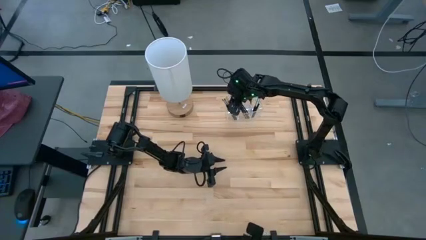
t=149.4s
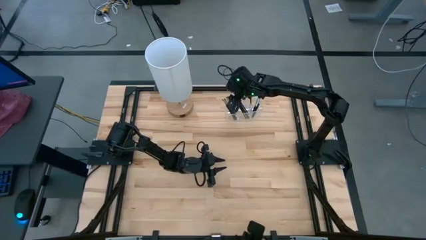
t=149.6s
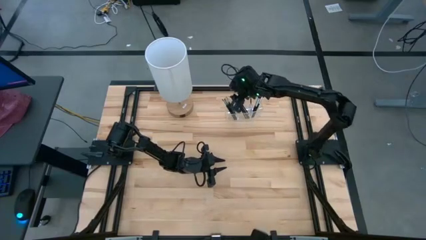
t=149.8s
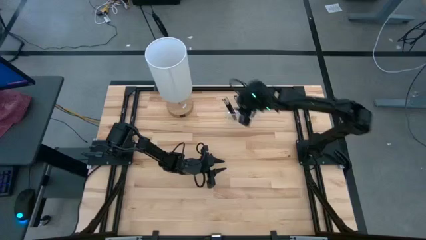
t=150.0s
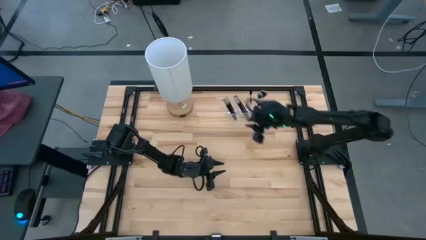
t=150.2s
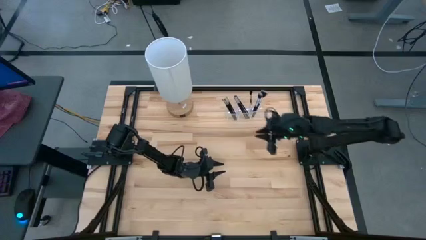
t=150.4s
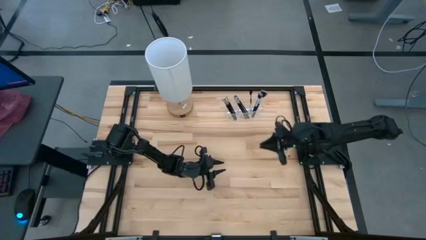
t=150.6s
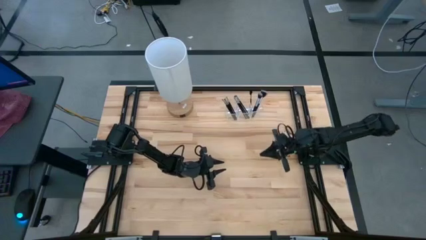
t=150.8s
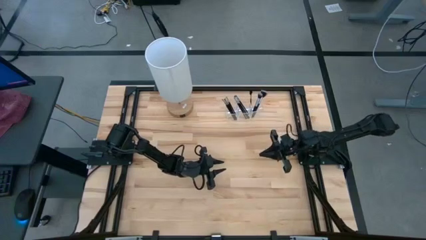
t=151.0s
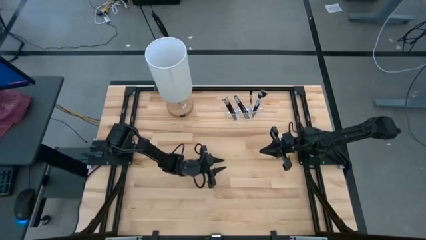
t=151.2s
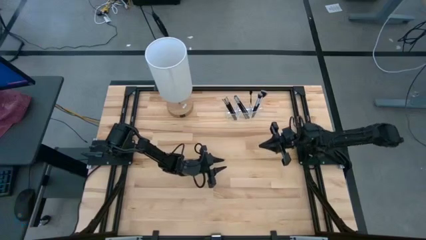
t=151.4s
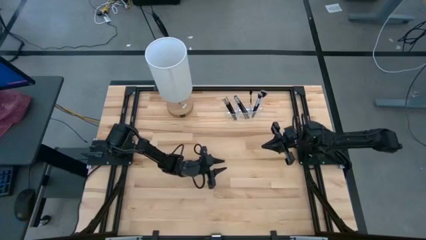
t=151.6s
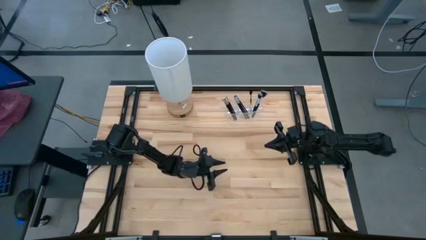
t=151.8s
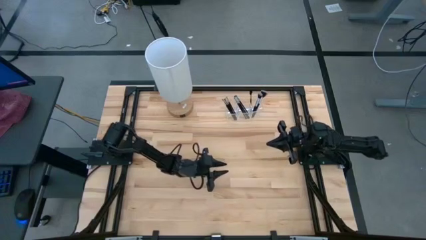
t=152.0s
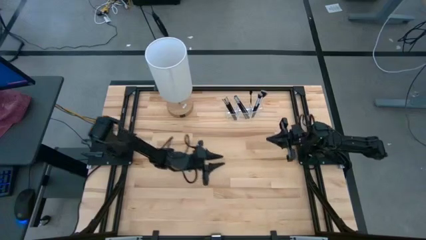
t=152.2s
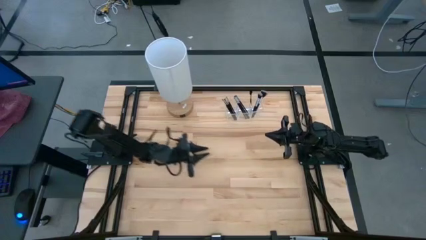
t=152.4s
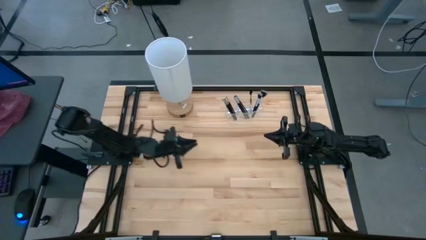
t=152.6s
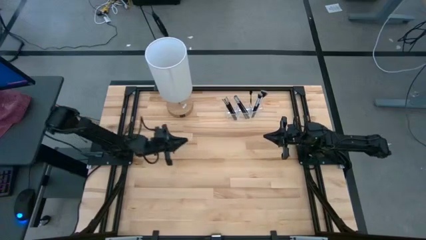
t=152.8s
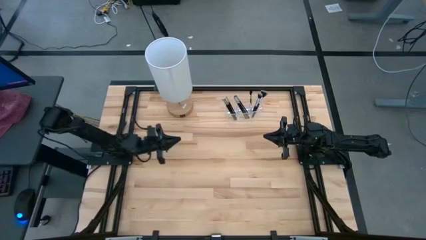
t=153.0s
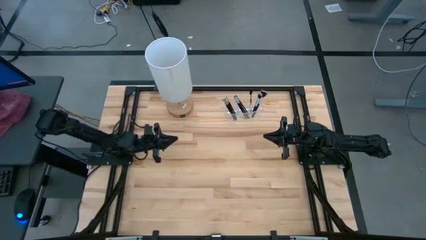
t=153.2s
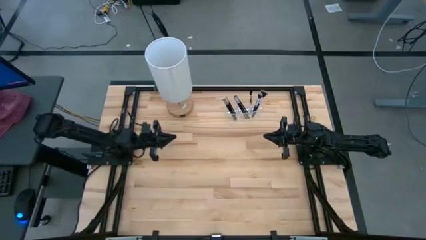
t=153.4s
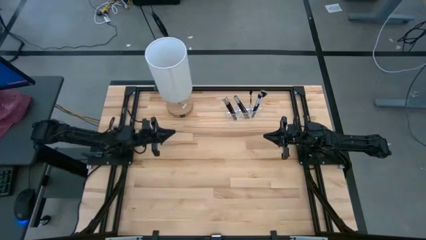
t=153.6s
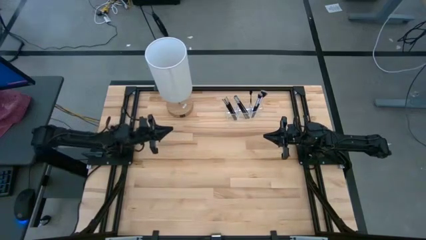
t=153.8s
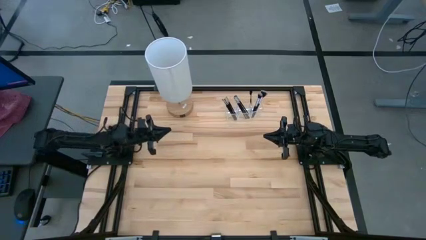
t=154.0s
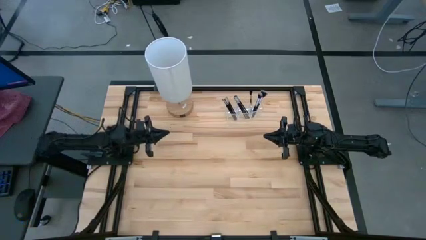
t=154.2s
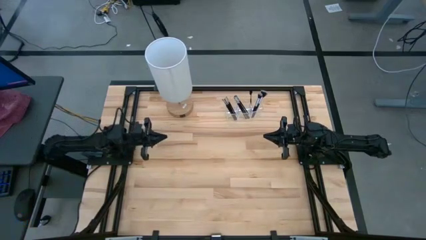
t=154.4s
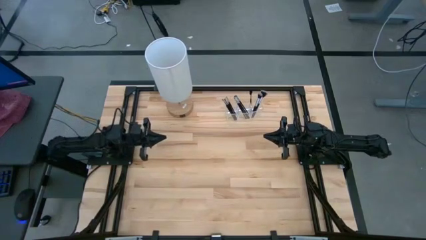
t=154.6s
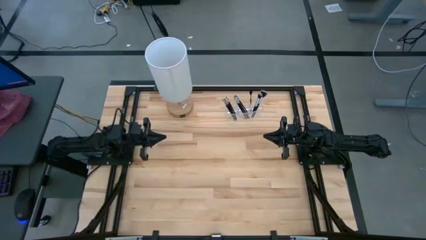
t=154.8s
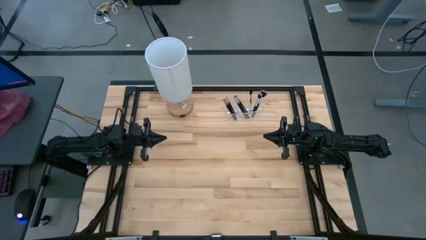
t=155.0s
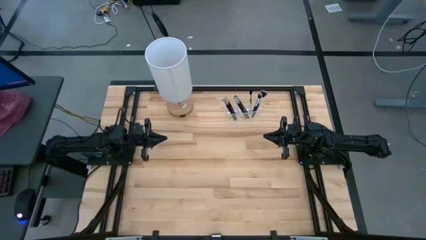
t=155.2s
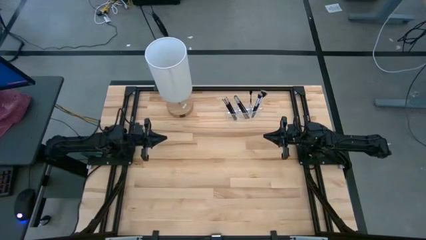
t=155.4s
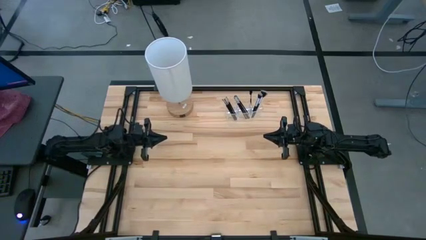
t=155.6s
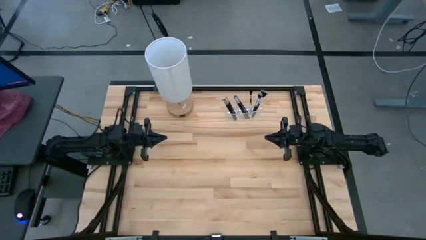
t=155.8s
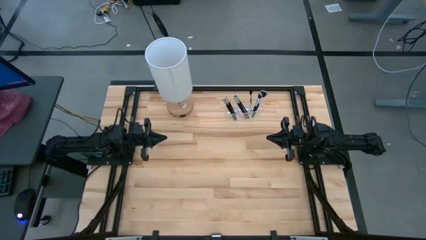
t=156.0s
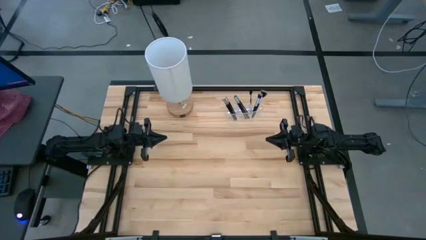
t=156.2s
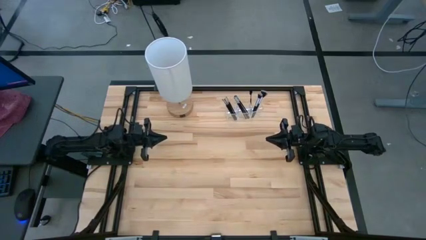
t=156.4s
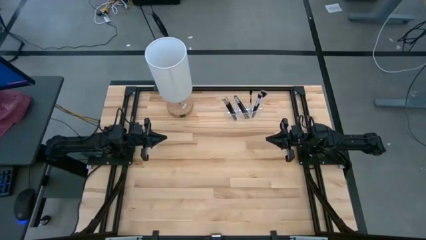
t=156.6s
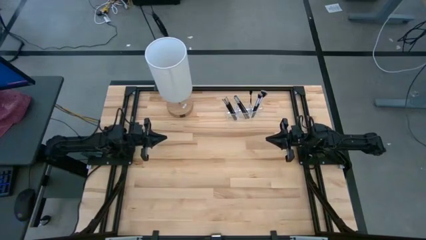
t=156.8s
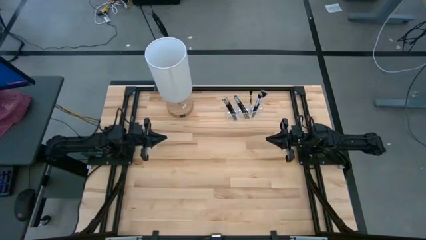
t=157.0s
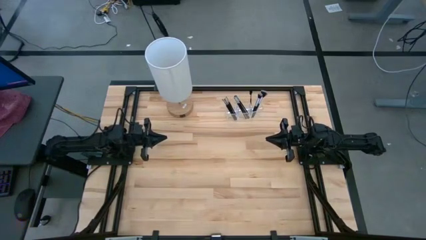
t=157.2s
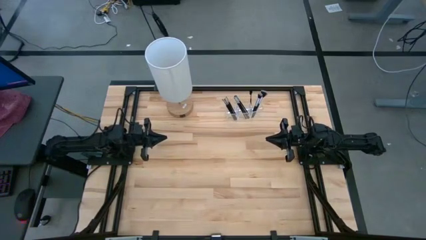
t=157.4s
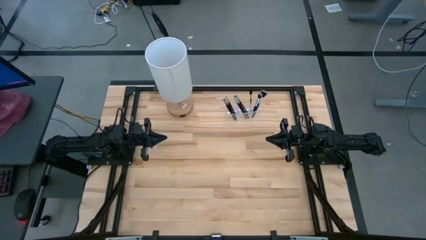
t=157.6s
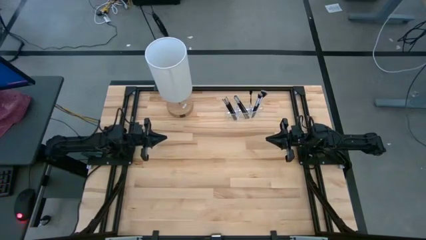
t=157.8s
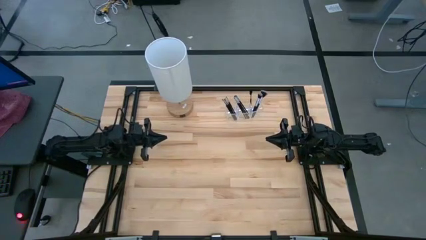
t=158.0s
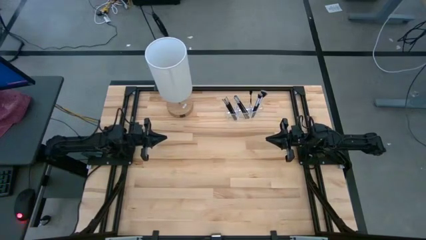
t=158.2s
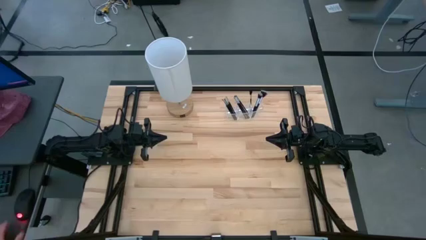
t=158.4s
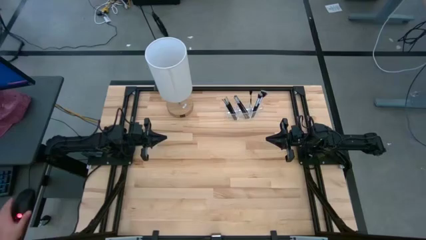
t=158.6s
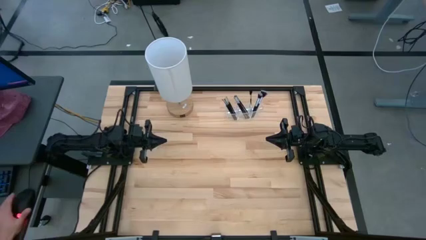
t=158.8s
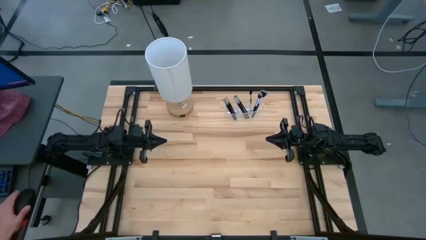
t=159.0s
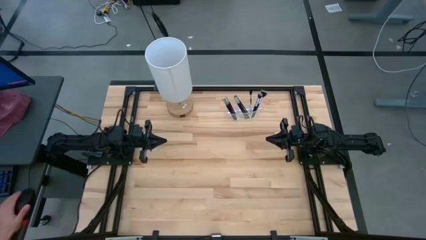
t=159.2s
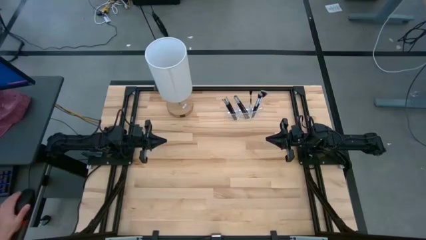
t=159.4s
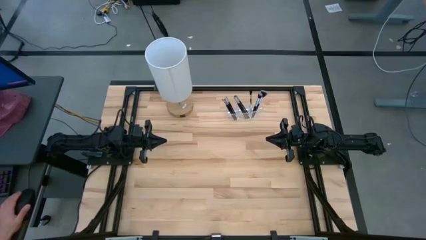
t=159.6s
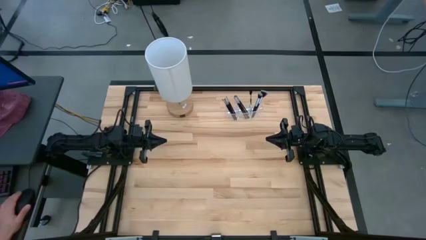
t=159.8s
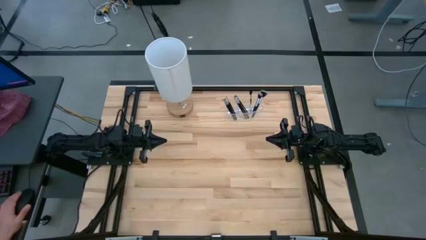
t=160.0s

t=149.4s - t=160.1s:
Task: Sort items
Return to Home Position

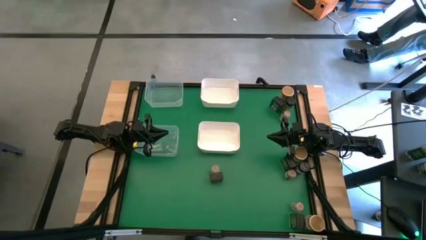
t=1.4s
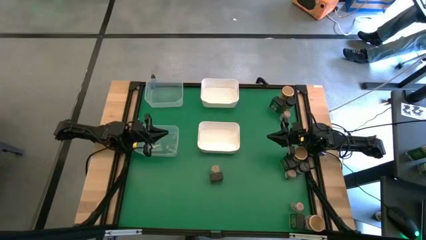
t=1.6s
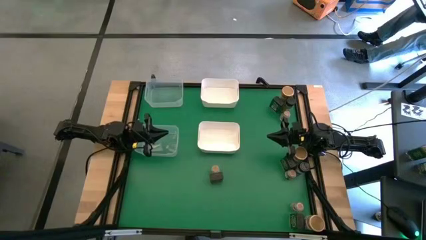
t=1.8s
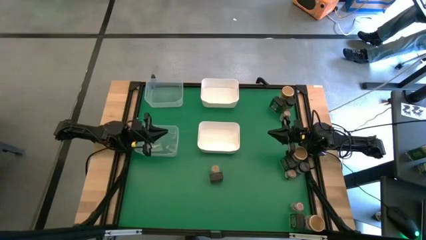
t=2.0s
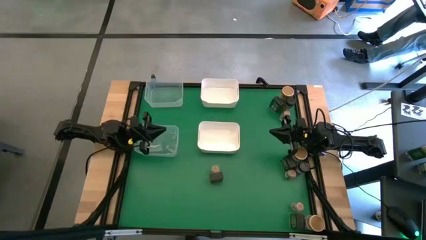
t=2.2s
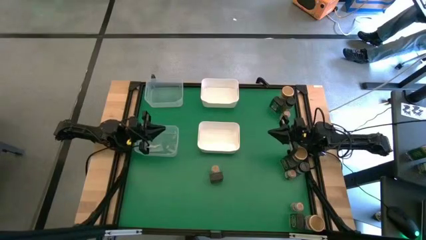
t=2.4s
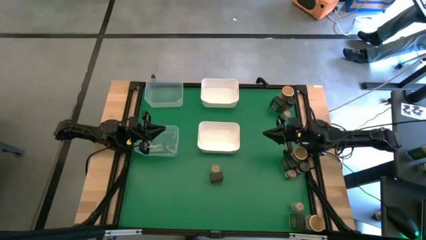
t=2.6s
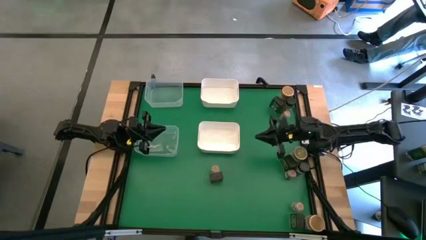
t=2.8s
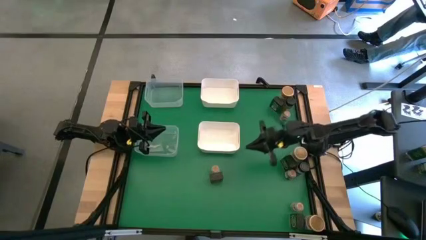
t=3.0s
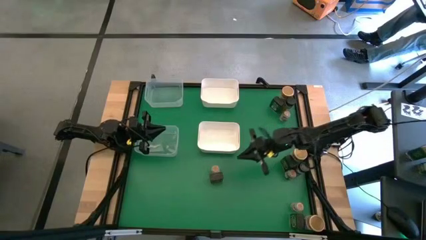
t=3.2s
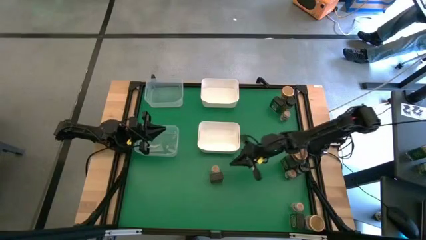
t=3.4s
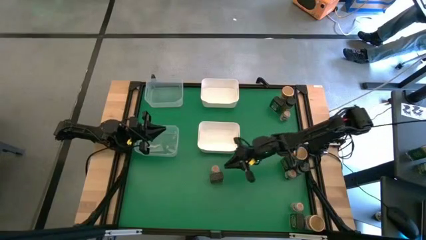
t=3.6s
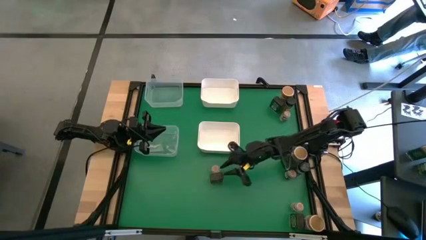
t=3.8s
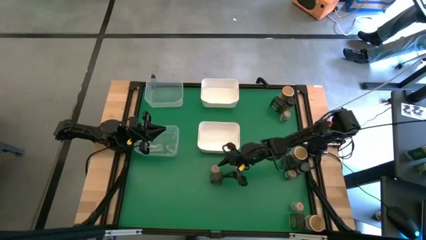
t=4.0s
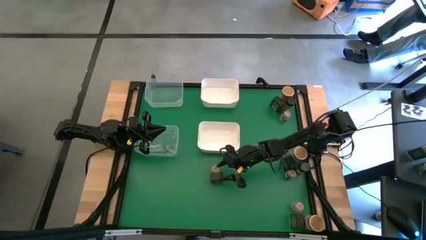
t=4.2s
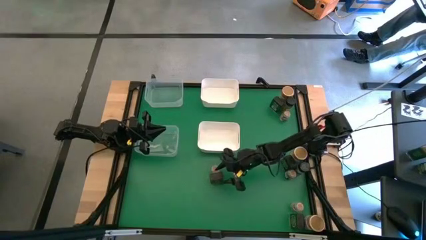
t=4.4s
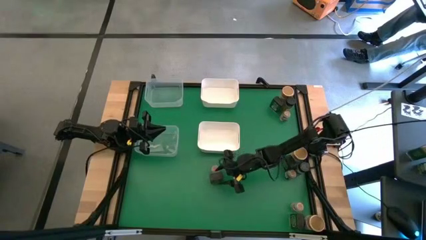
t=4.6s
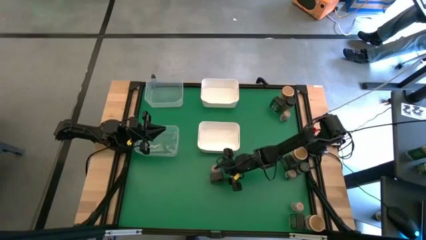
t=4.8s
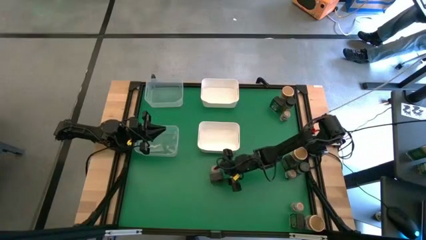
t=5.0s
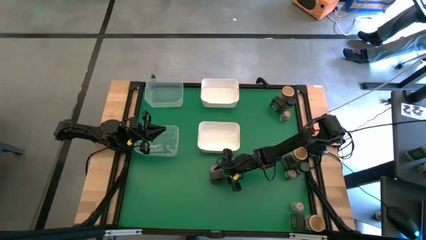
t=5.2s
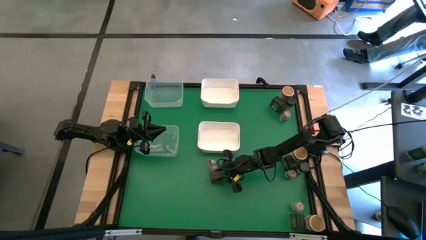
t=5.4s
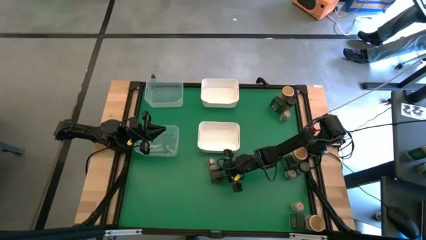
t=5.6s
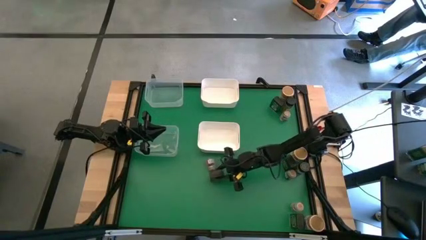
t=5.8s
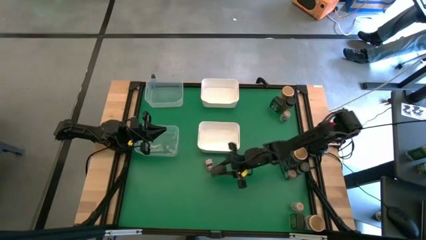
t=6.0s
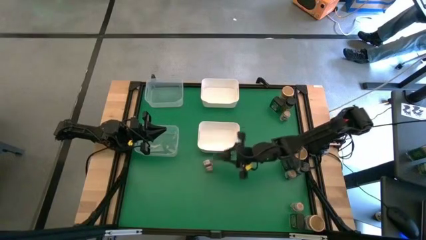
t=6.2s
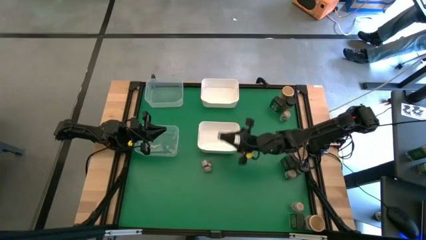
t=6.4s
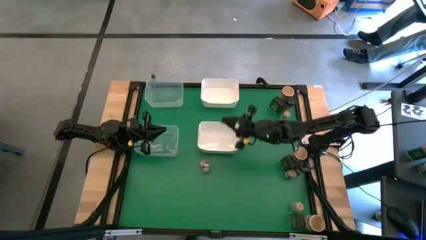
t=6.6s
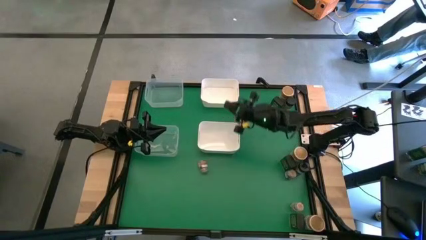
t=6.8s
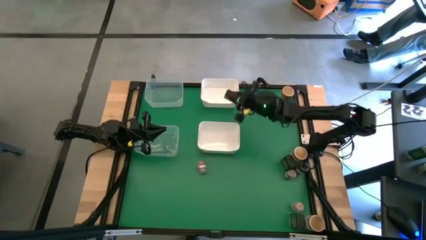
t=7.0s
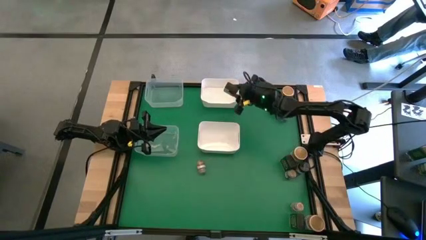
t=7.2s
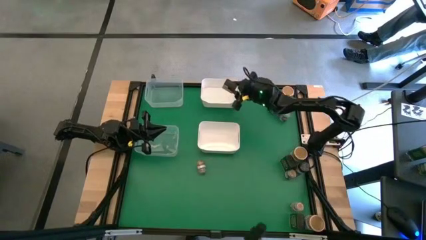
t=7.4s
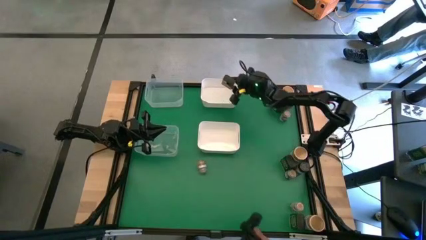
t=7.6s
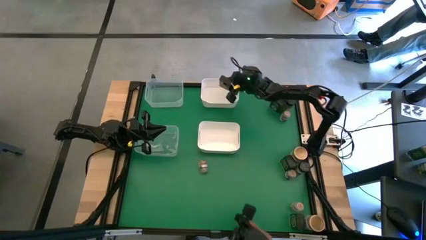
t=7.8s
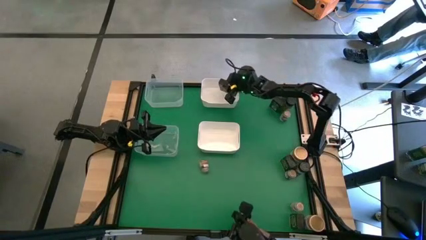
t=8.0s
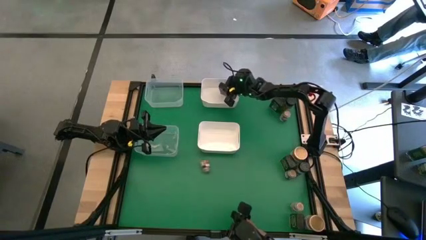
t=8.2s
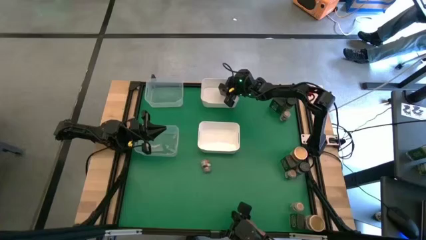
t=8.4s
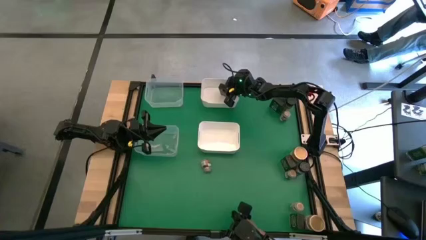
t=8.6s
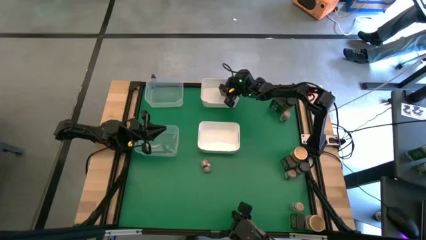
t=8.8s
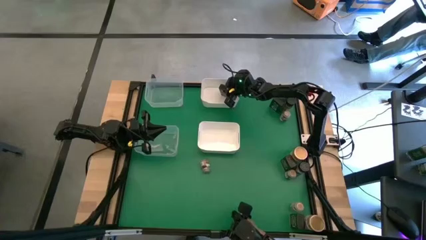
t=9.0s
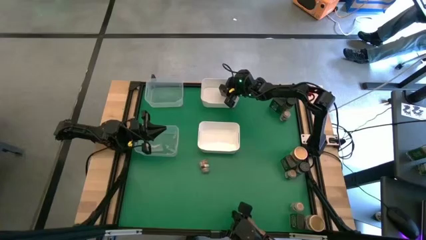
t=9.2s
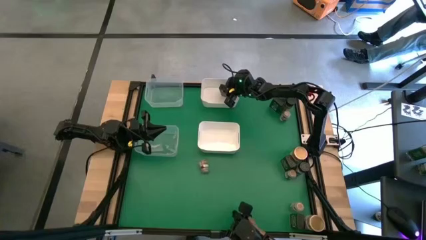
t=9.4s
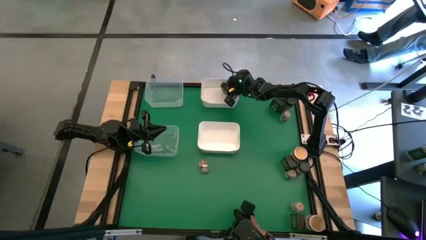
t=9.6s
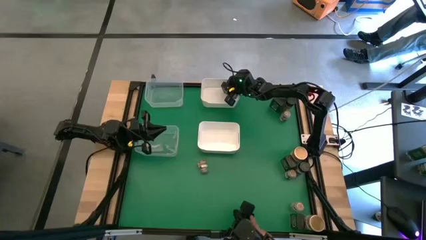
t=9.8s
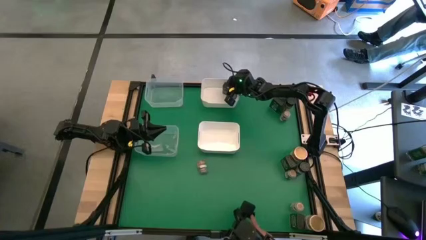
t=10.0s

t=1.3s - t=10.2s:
Task: Sort spices by type
Put the middle left black seasoning can into the top white bin
